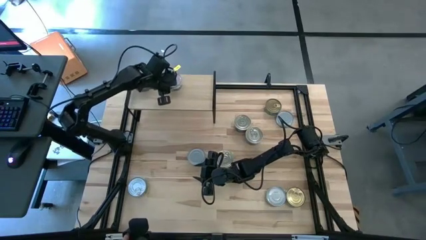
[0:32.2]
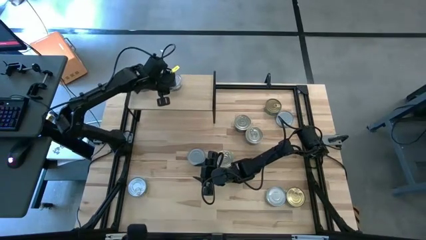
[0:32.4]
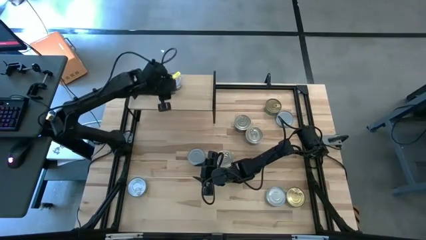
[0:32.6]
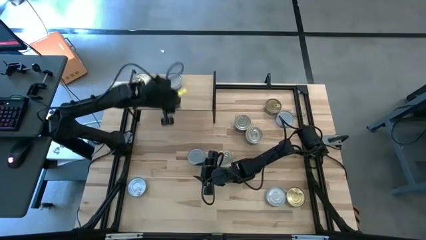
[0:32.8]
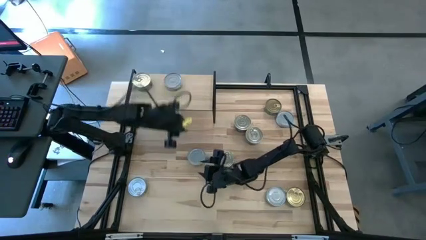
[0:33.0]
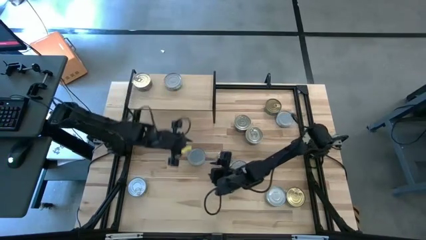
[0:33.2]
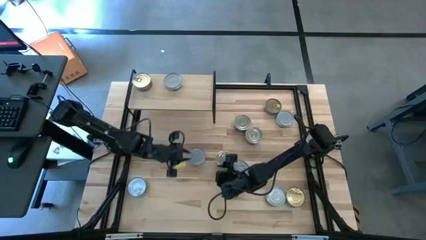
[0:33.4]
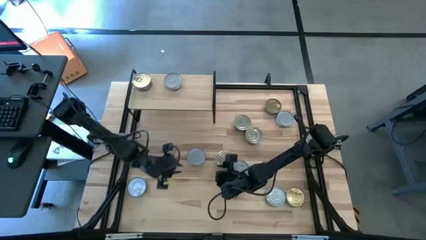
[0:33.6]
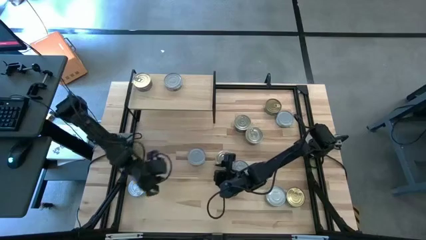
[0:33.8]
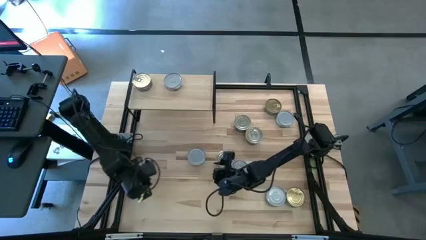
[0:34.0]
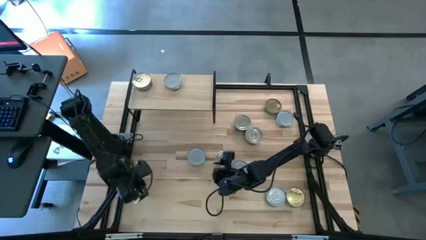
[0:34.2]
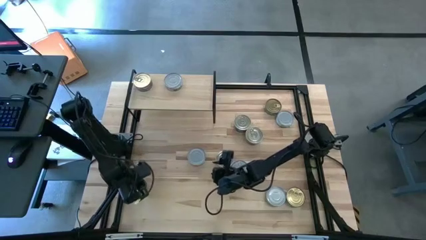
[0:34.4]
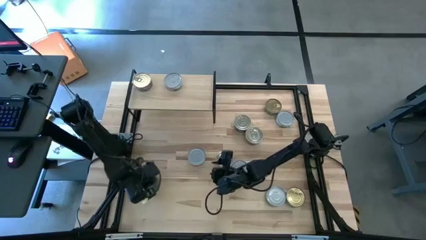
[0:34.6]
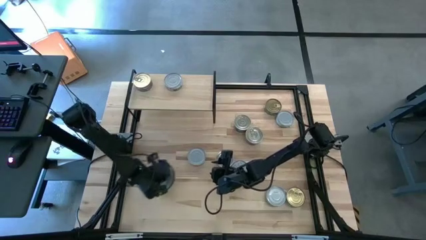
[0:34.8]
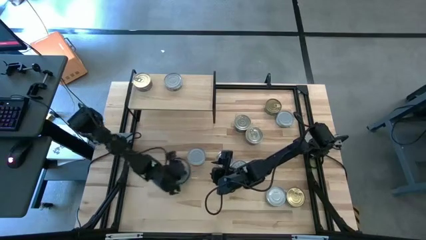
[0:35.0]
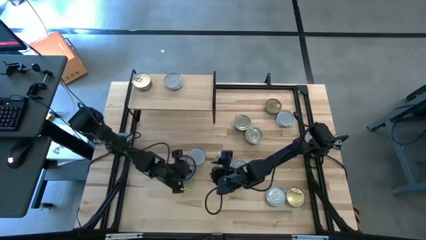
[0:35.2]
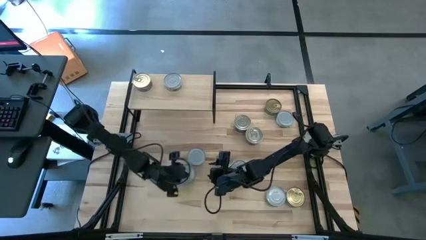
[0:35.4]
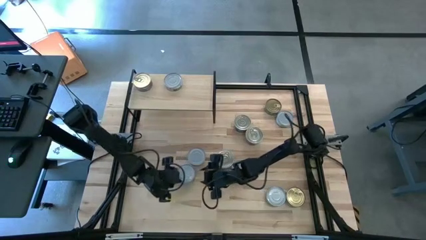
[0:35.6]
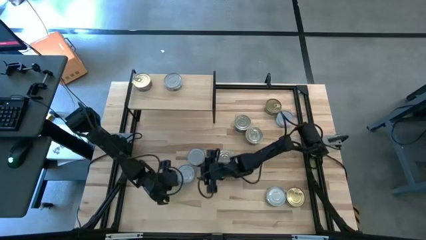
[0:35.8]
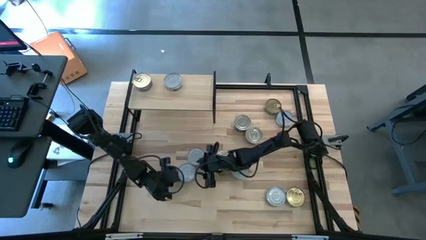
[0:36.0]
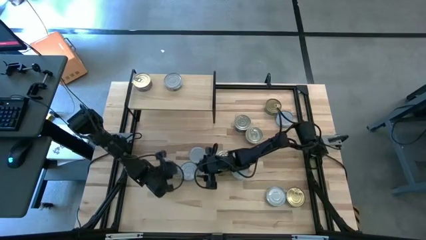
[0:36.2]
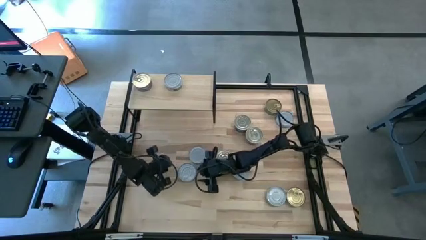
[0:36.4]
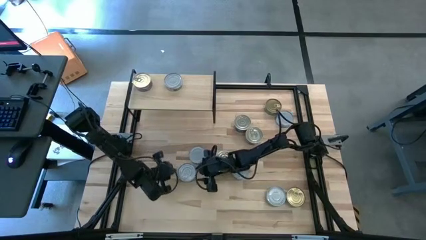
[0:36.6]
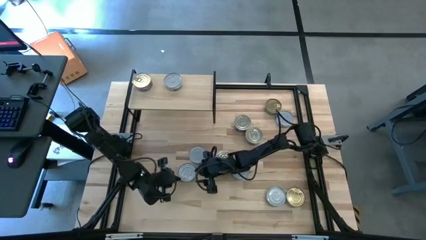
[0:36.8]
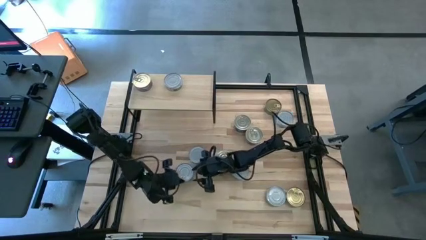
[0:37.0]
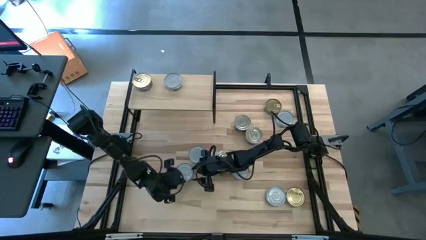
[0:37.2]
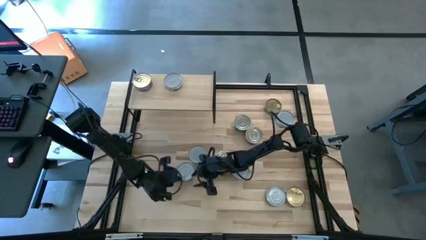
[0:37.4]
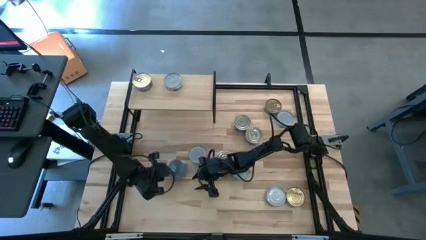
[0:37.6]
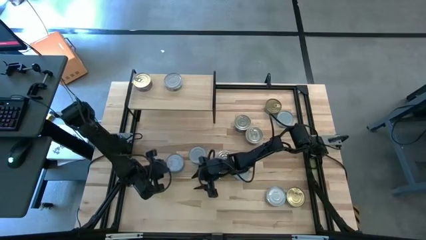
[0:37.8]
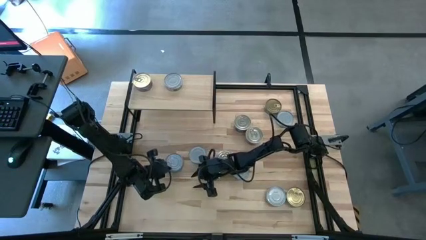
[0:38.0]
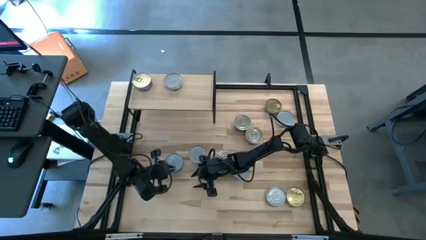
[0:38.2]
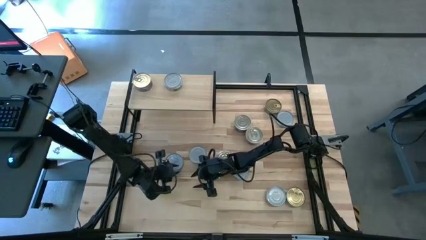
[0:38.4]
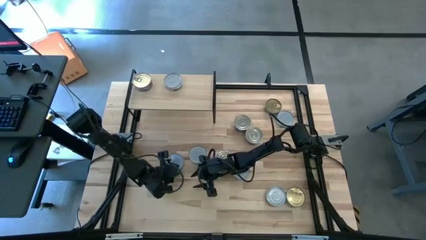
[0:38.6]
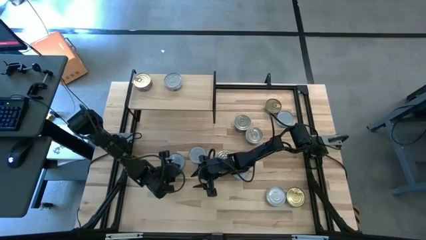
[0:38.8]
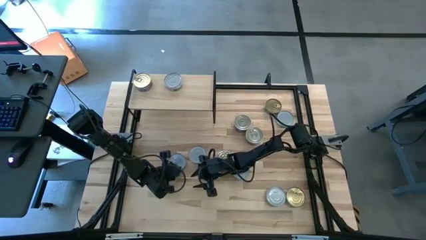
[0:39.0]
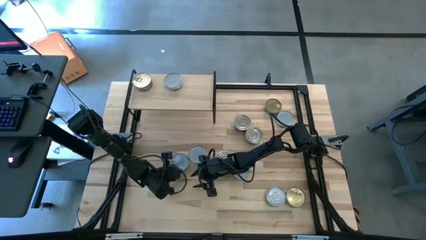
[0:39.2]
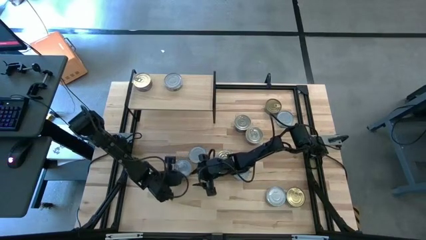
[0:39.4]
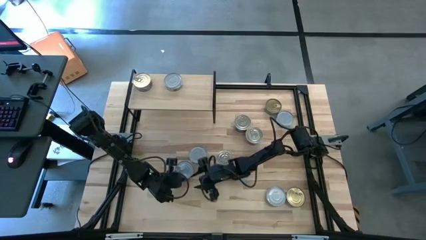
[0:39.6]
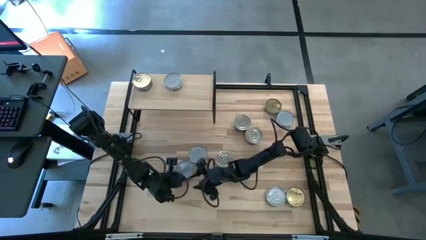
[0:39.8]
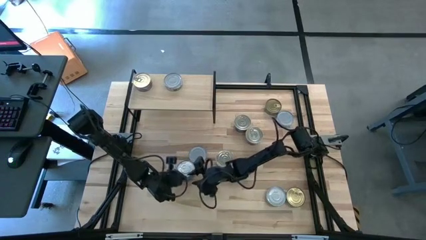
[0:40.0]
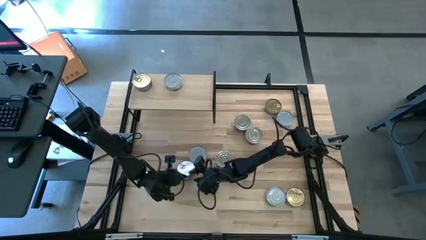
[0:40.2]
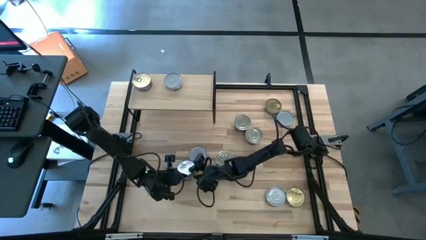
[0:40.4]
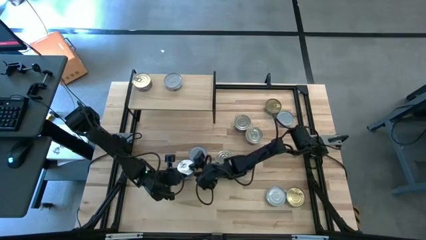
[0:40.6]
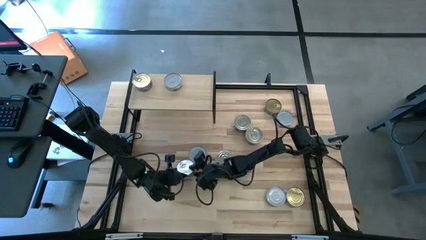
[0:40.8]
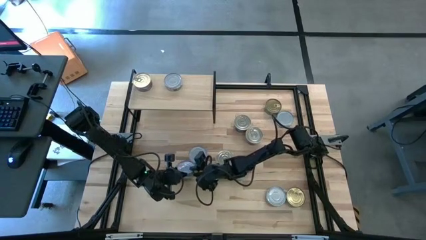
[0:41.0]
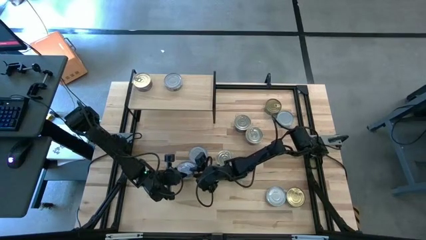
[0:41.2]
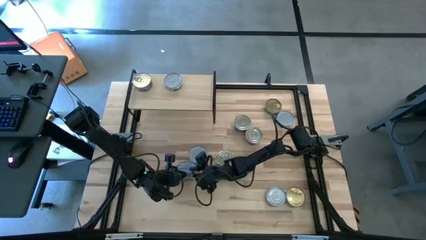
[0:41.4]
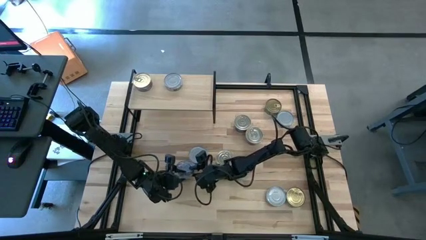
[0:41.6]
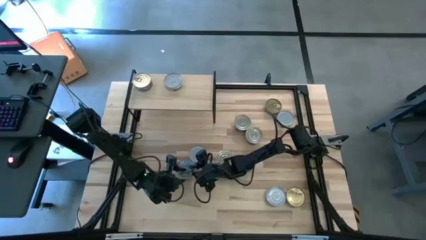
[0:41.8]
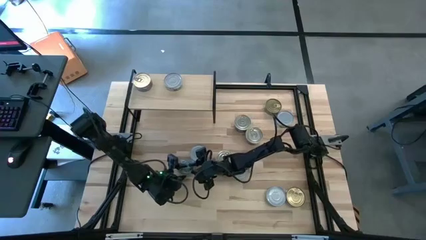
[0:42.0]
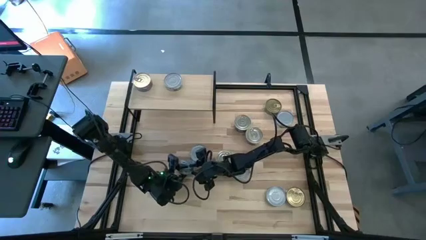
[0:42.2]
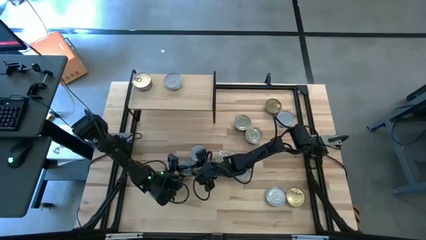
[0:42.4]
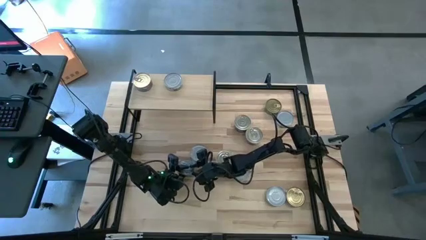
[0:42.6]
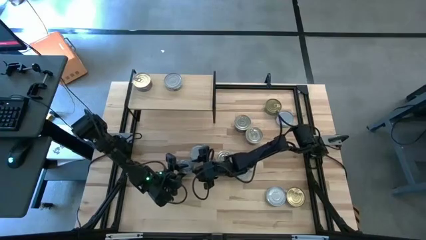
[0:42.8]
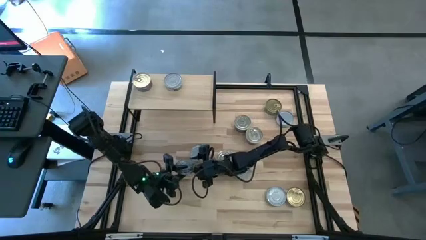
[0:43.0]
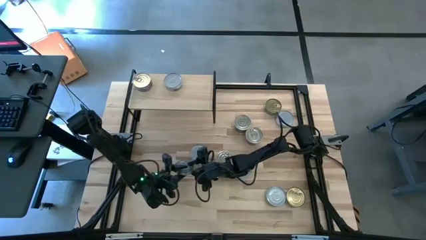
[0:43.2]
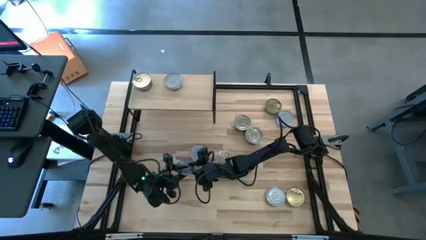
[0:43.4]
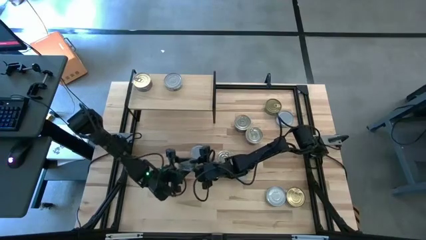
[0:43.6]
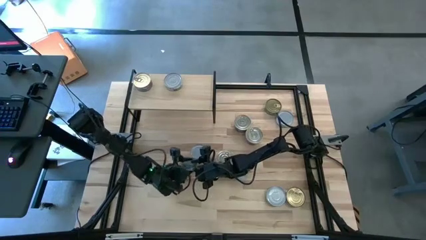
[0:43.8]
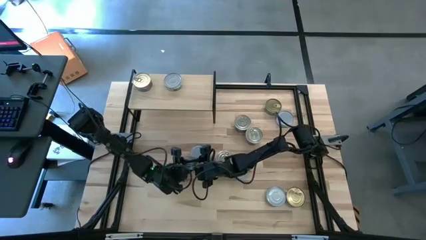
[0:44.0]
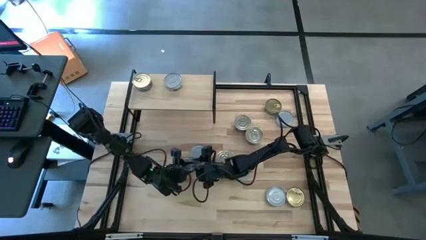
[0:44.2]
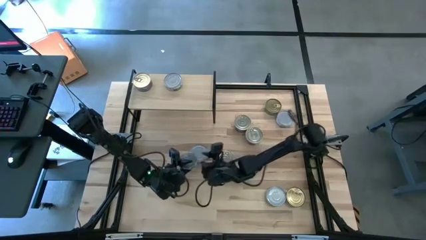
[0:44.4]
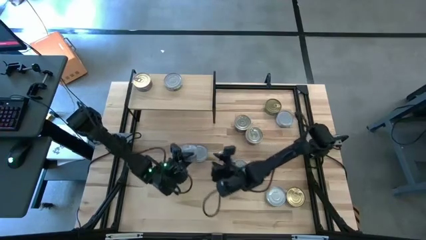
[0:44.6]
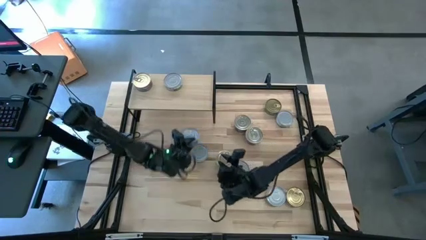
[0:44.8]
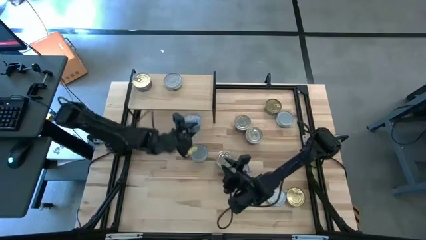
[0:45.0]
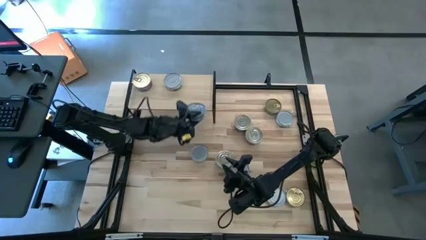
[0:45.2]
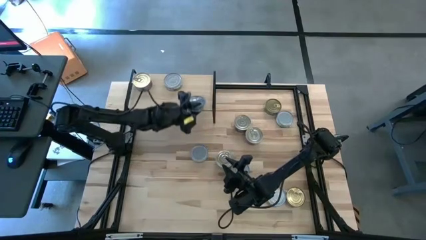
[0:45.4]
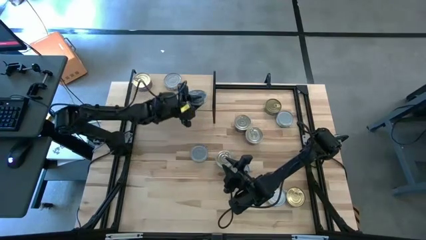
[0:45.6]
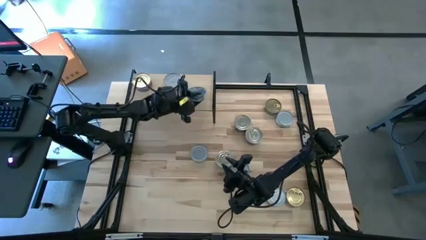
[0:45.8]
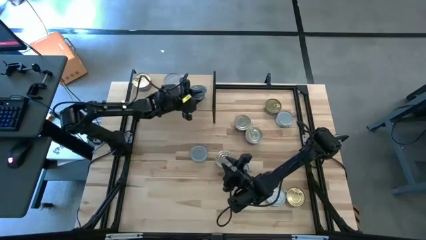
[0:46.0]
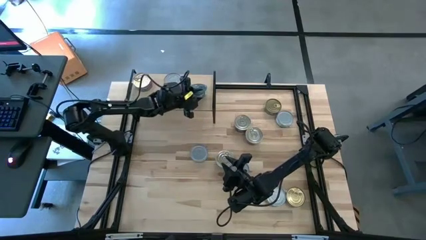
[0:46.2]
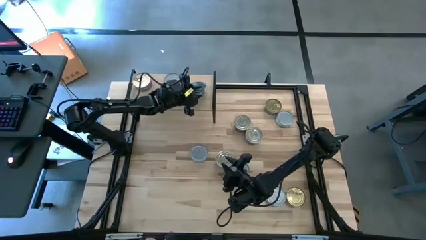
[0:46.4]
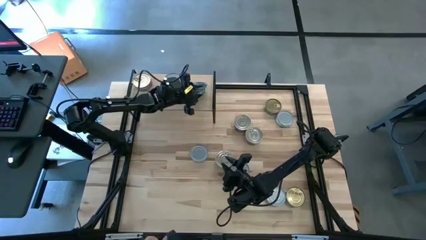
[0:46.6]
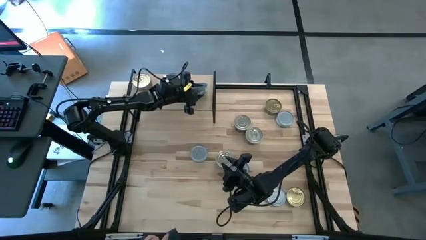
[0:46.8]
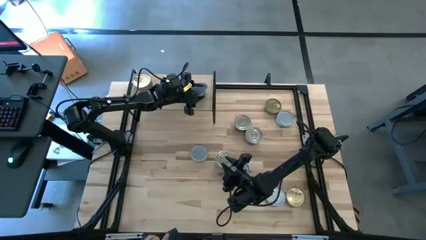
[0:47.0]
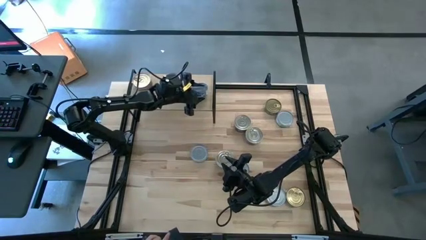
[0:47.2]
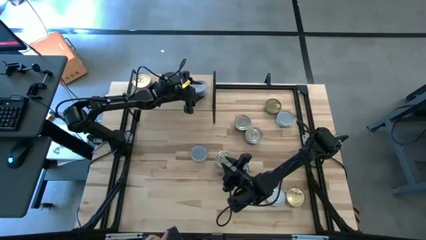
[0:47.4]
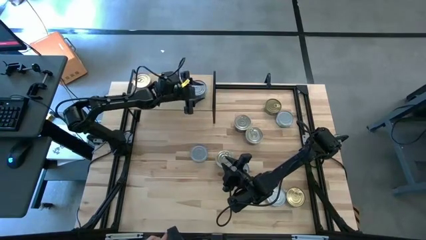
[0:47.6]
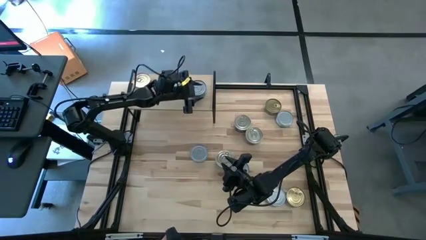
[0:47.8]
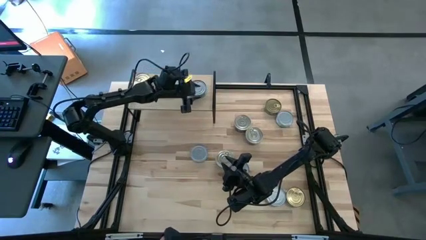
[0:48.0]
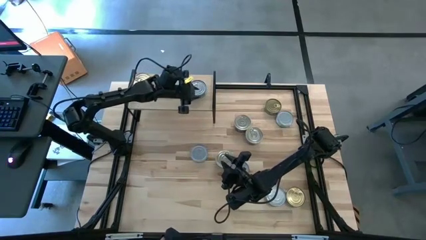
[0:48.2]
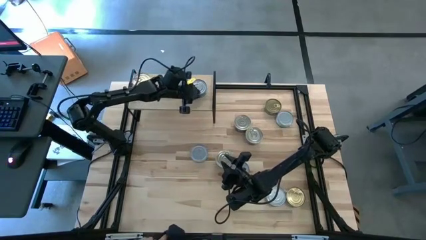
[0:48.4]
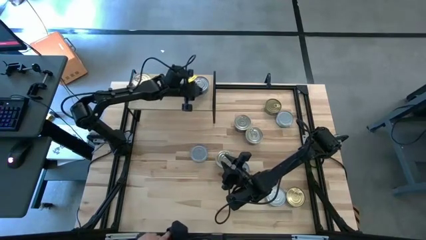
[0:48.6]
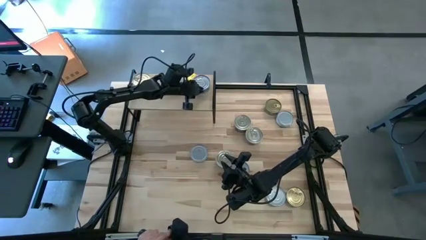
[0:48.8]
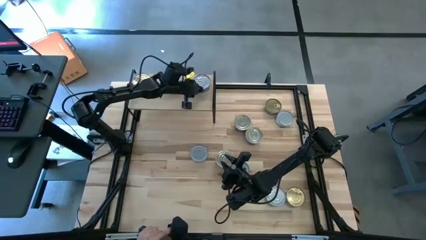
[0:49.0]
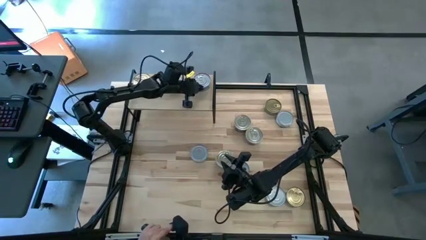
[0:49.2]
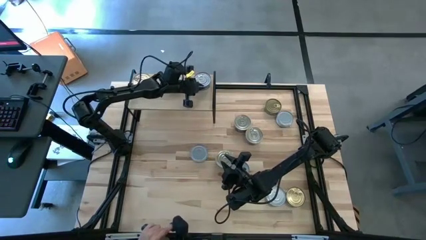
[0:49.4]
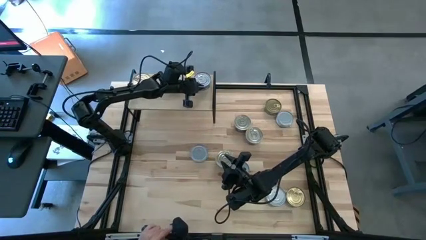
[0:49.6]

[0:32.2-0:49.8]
Task: Stack canned seafood by type on shelf
Put the green blue tuna can on the shelf
